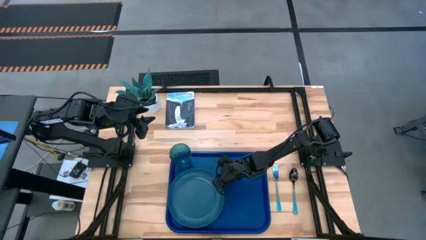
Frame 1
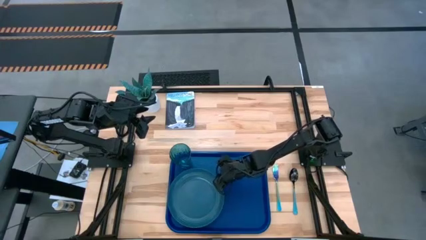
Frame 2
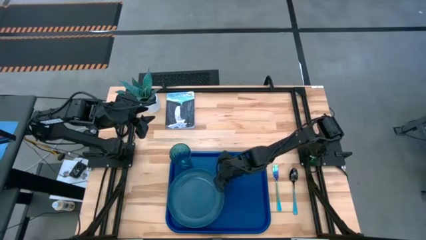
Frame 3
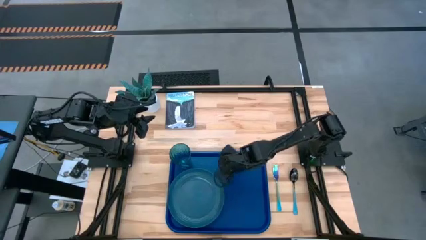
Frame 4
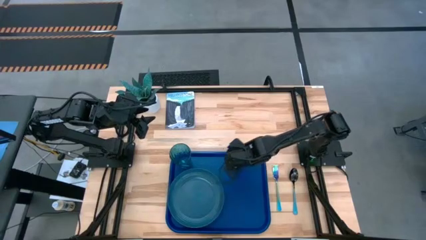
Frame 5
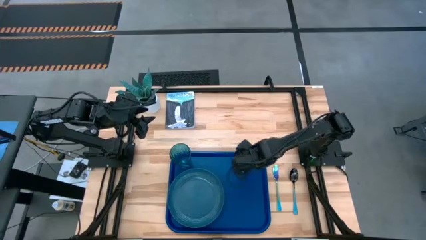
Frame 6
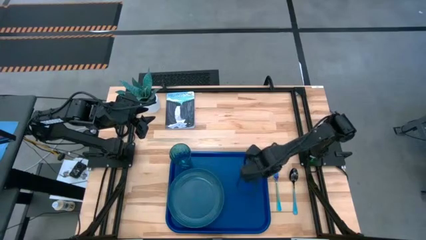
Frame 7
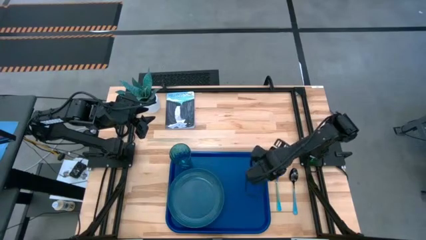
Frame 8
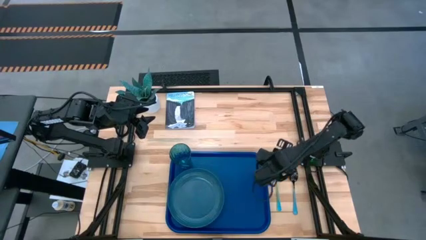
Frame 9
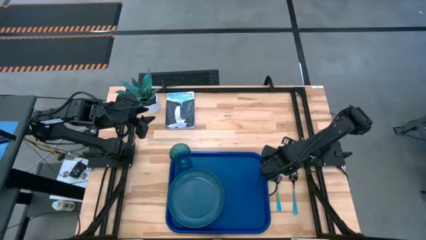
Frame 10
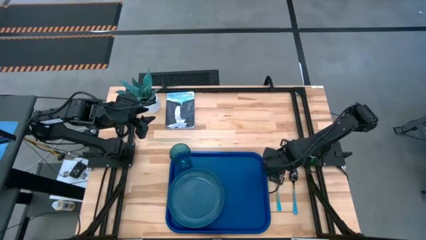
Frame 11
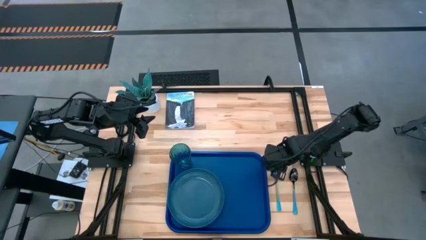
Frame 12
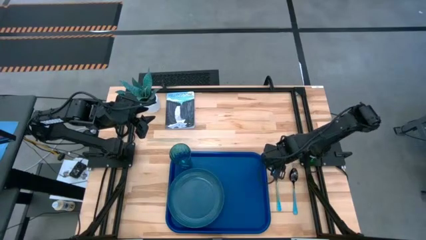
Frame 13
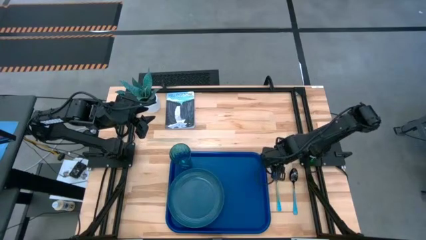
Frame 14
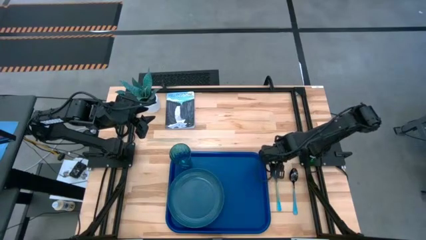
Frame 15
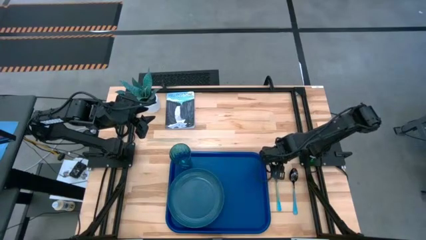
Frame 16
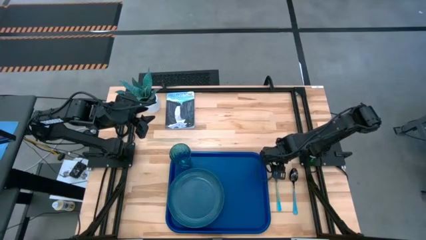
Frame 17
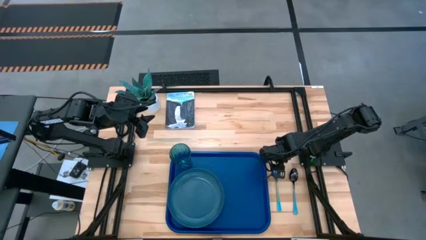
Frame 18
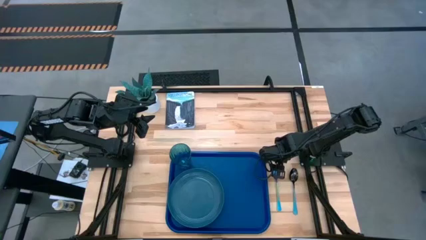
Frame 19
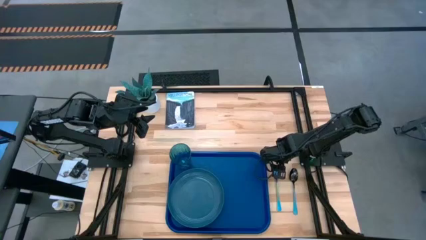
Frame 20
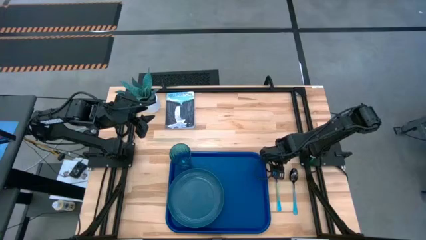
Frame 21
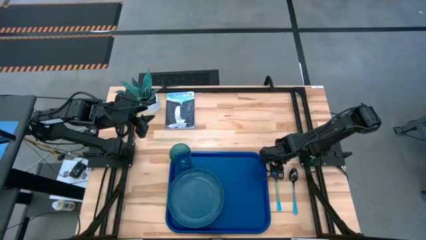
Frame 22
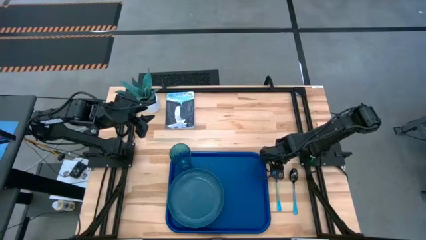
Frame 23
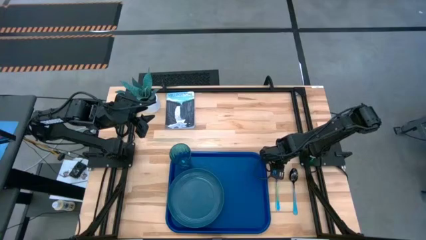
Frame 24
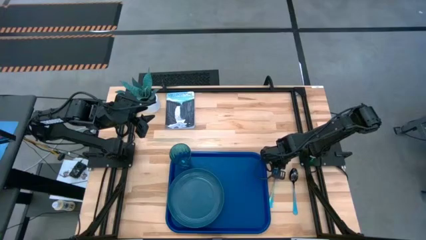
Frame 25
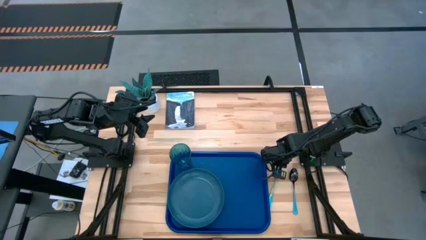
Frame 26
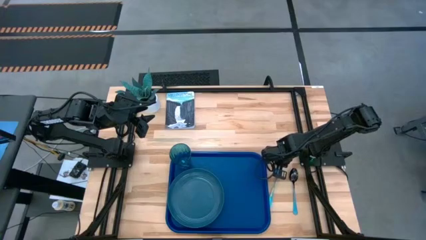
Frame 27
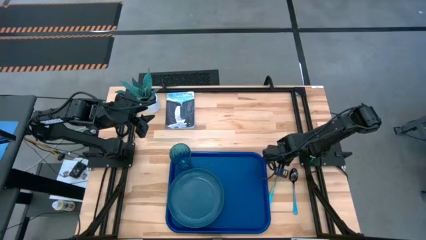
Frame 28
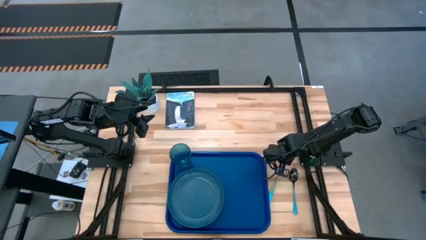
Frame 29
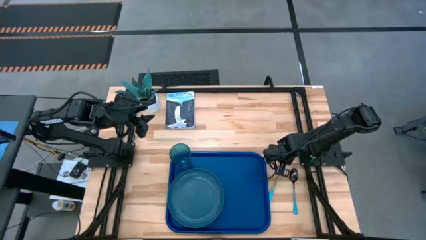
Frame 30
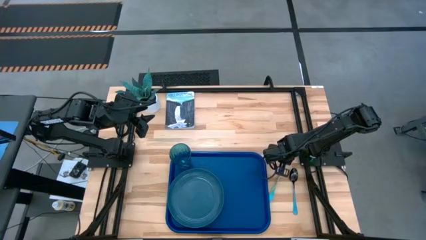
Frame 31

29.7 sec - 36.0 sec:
Task: Pick and place plate/cup/fork/spoon on tray
Put the blue fork on the blue serving tray to the right of the blue plate

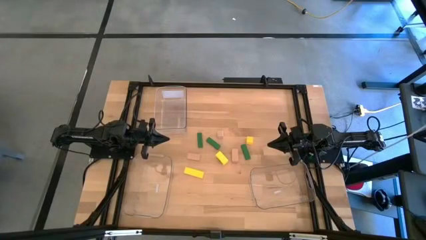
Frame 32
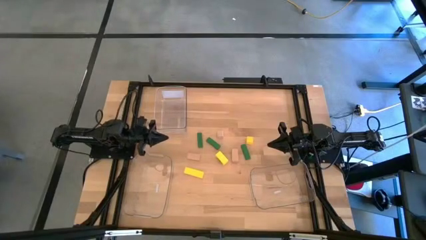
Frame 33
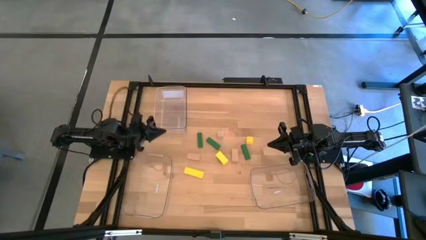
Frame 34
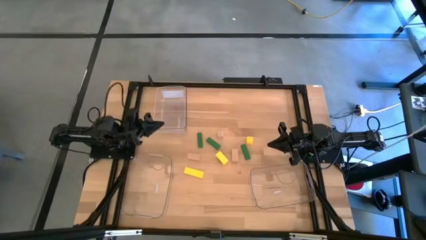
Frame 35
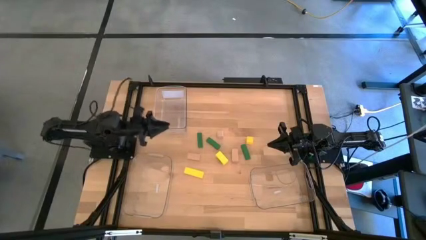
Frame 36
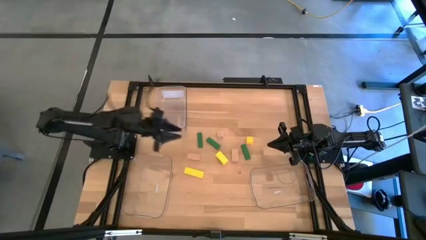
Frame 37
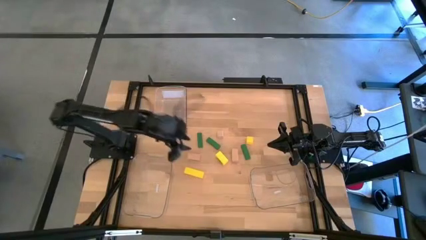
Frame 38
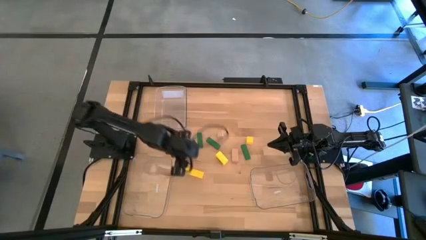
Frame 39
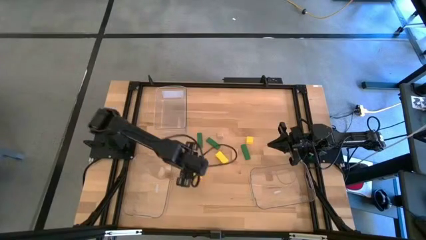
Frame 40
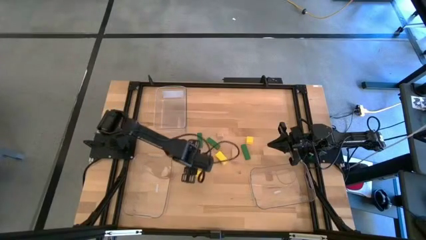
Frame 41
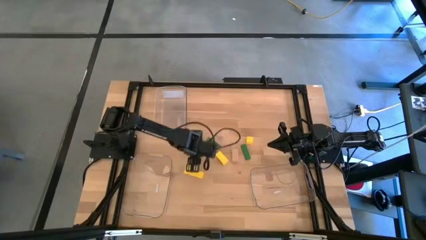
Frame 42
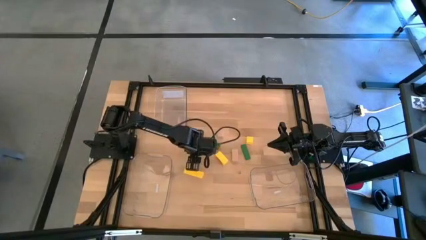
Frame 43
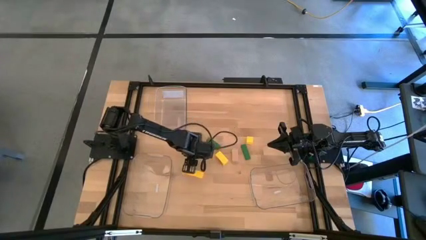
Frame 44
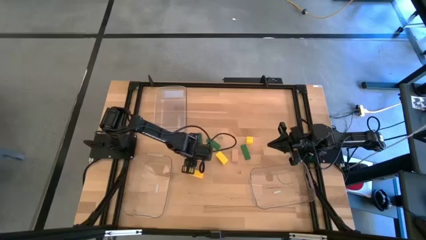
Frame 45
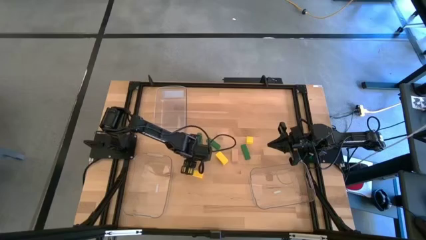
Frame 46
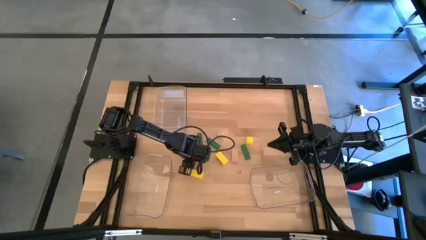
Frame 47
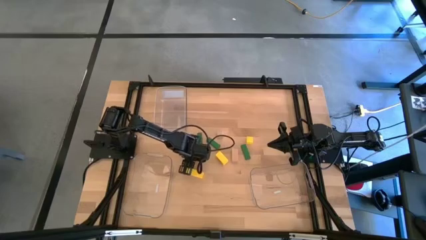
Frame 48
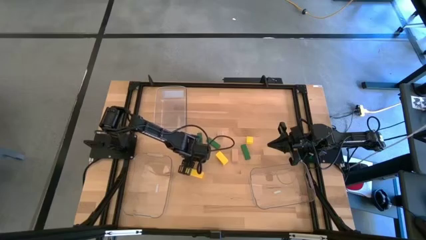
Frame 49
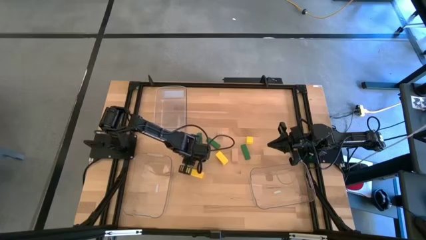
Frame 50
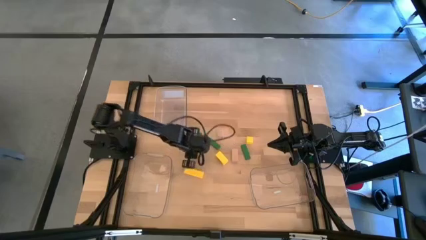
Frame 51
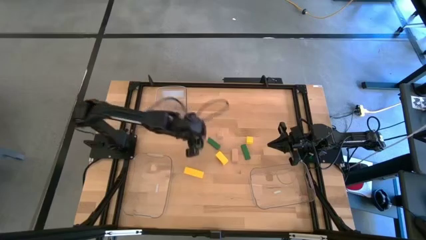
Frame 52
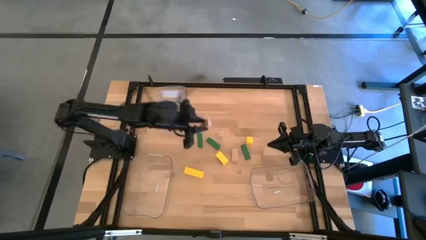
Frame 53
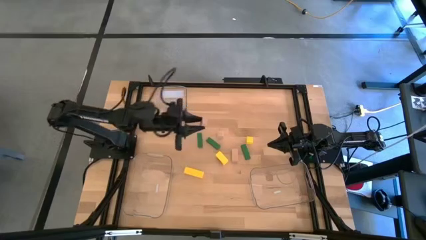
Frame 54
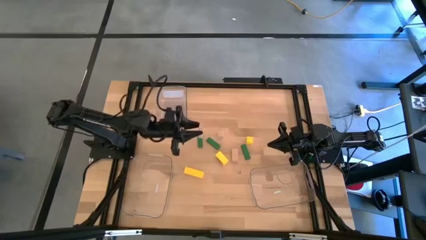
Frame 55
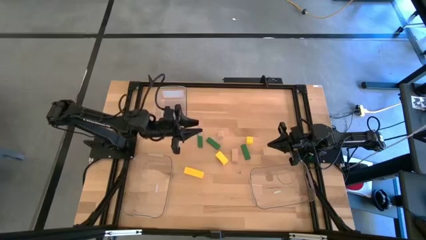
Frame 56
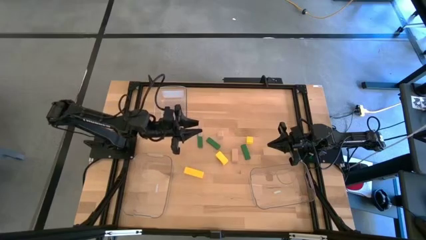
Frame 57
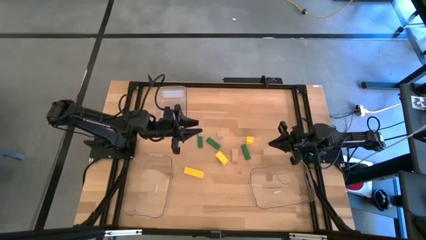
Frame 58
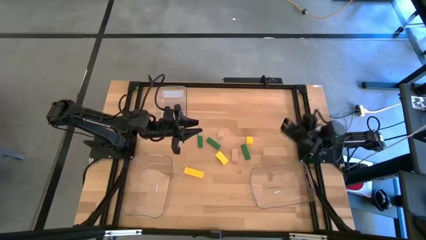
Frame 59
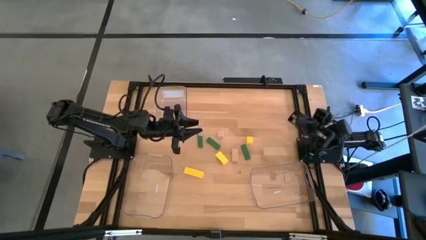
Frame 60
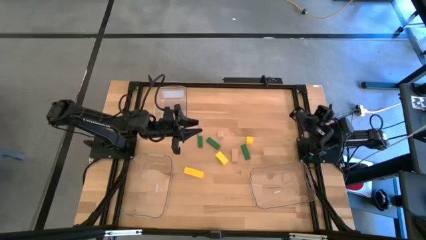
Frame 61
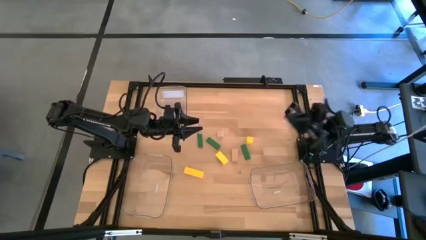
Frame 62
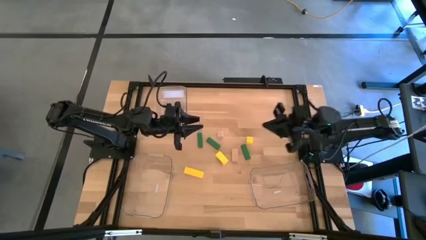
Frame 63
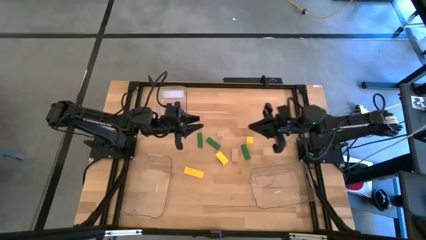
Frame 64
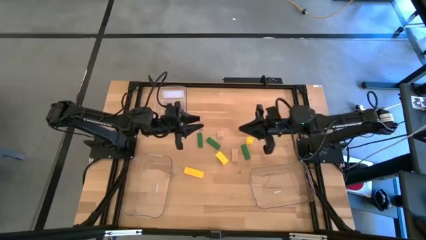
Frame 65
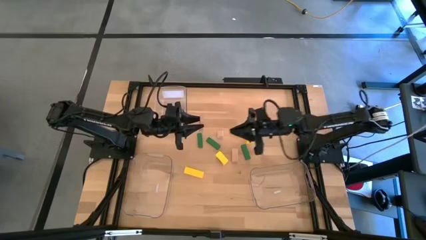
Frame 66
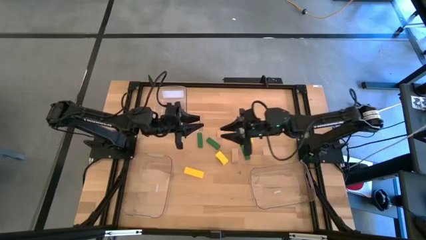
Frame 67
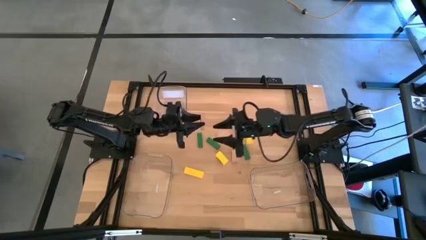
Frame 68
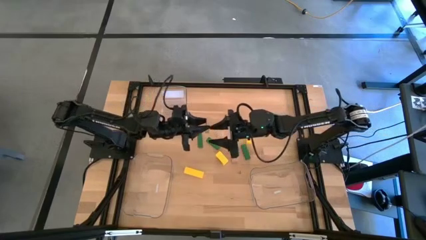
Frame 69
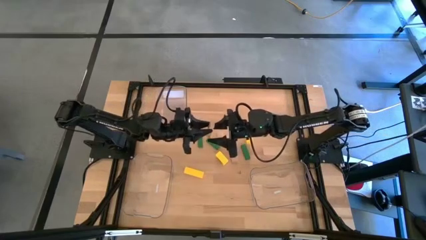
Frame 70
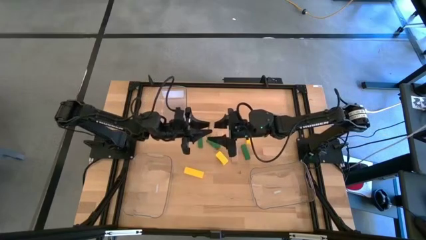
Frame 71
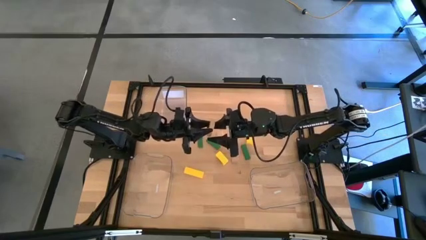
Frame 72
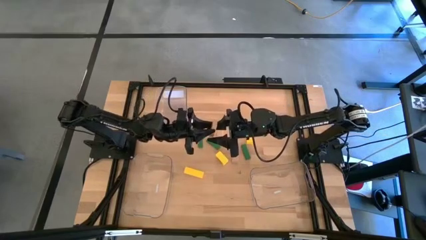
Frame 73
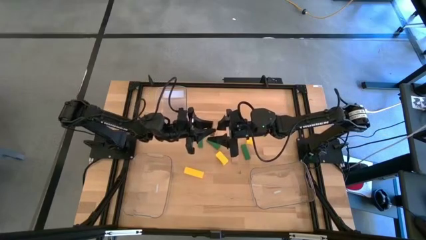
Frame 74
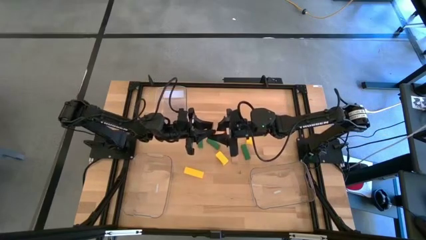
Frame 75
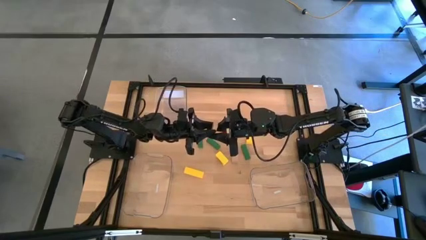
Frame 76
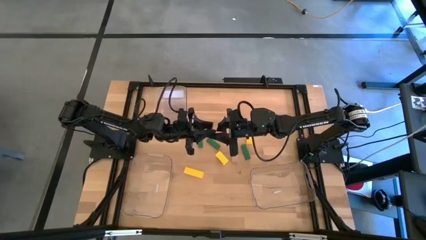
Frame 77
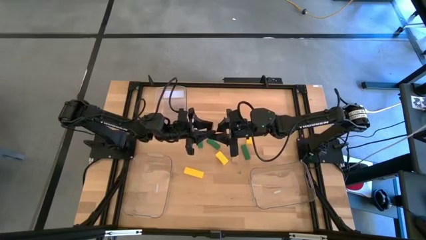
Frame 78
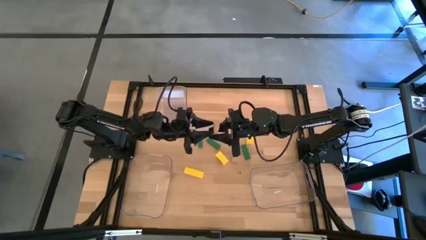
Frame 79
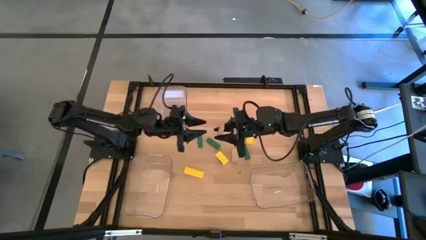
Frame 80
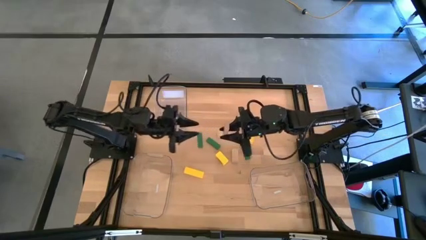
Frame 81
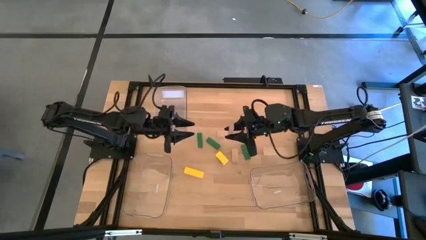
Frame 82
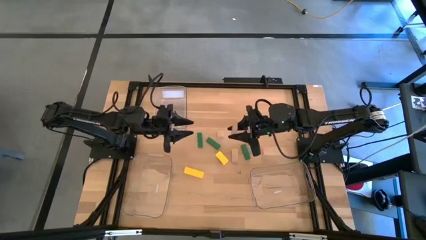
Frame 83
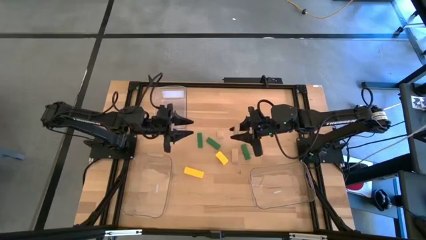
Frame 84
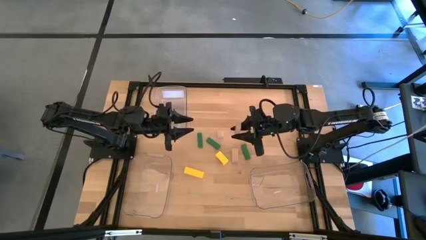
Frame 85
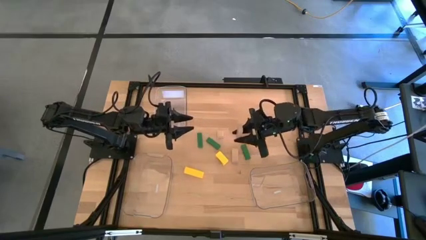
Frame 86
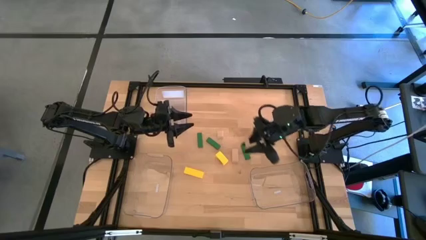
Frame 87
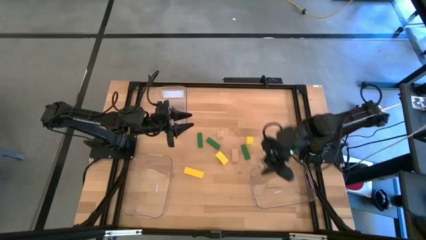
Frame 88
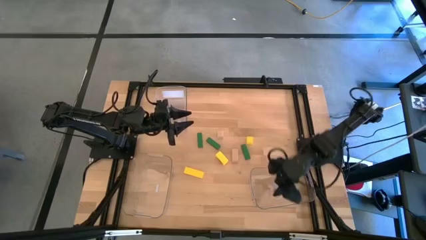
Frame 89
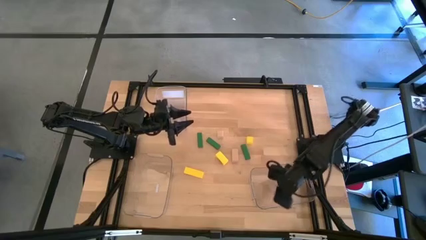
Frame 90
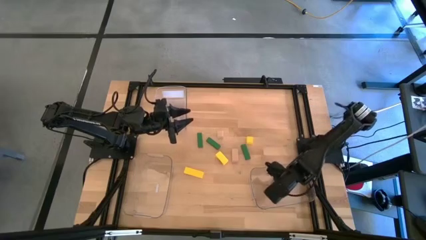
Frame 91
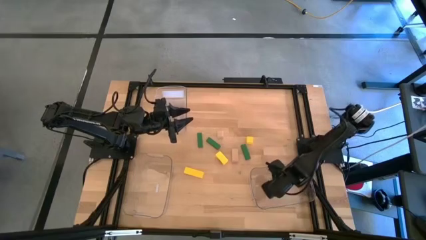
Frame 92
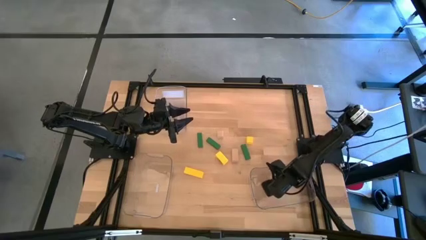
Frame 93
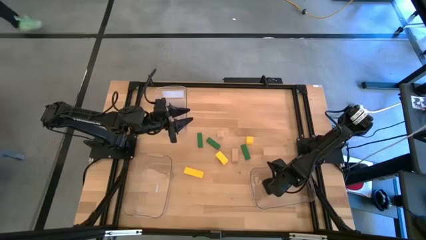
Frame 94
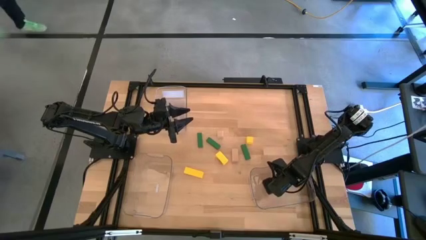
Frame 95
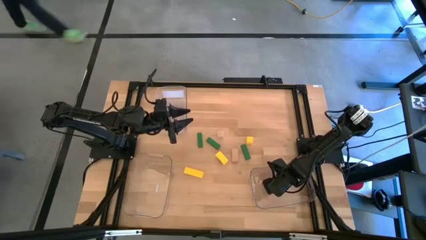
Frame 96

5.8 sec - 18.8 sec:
Task: Sort & place blocks by color
Put the bottom left brown block into the bottom right transparent bin
